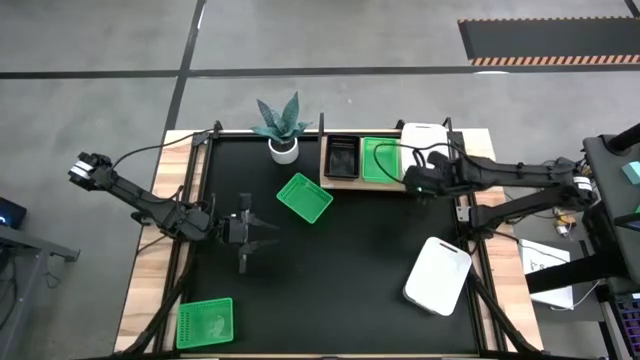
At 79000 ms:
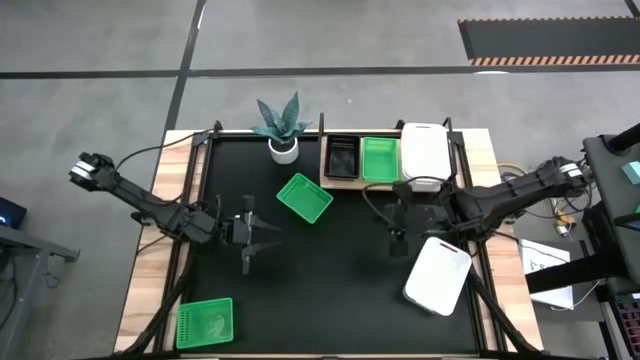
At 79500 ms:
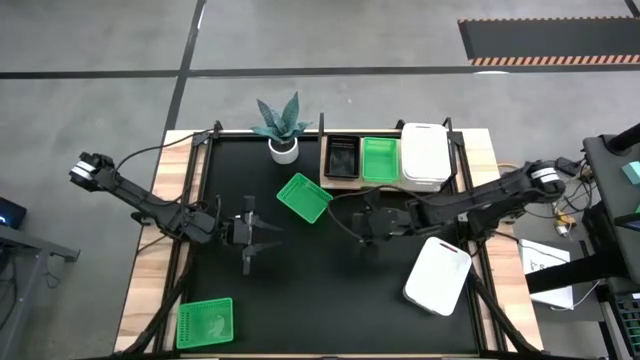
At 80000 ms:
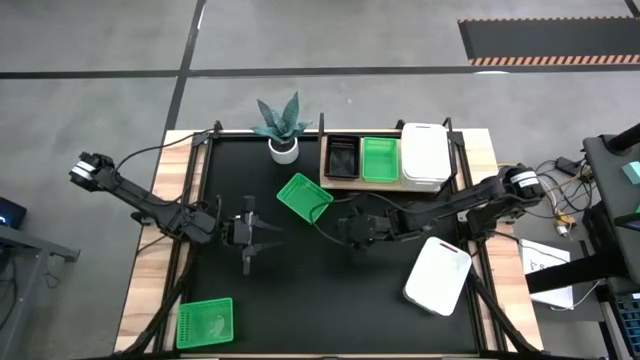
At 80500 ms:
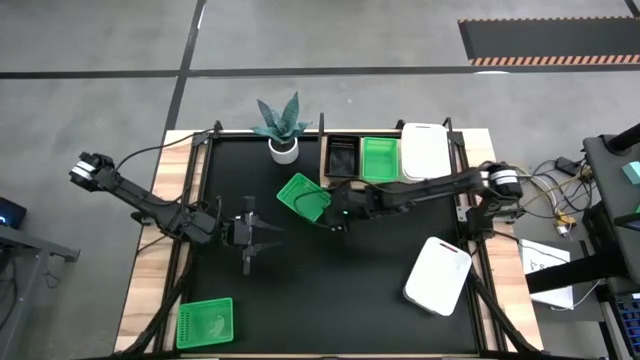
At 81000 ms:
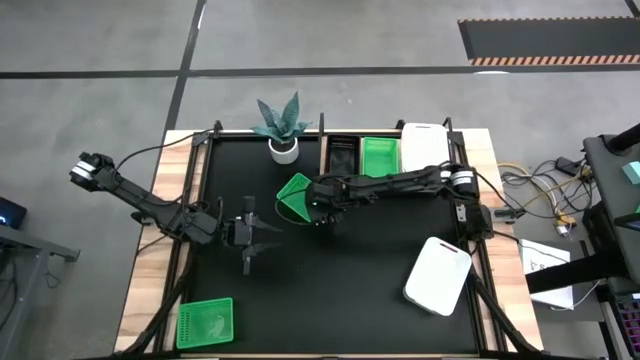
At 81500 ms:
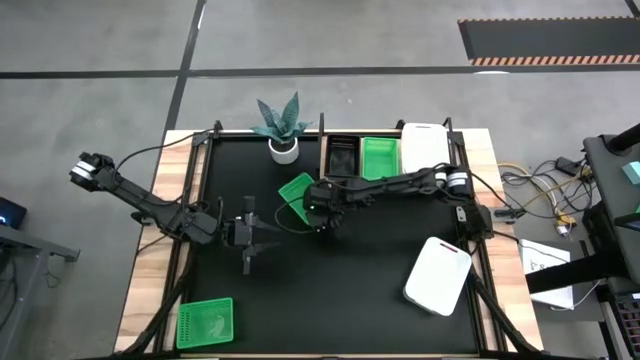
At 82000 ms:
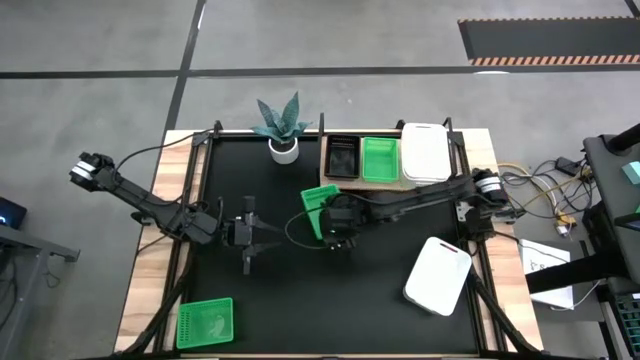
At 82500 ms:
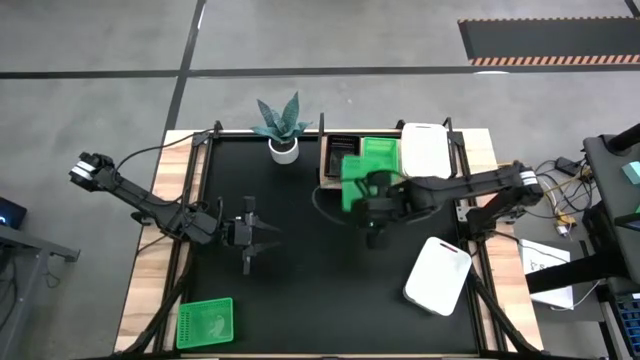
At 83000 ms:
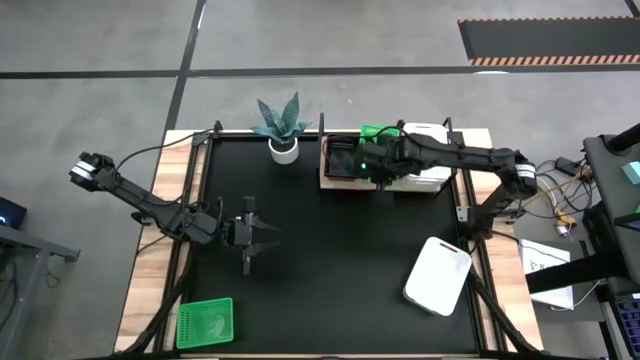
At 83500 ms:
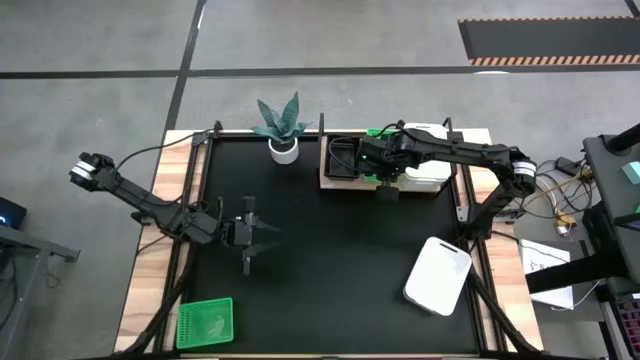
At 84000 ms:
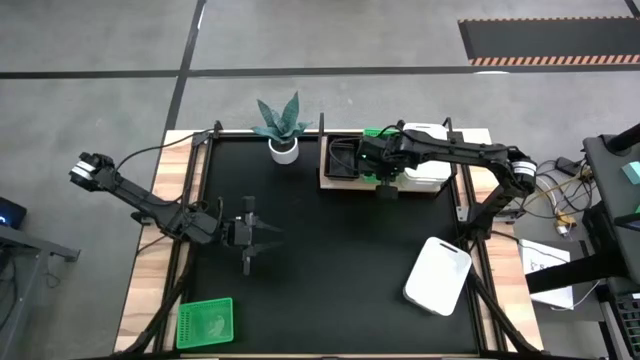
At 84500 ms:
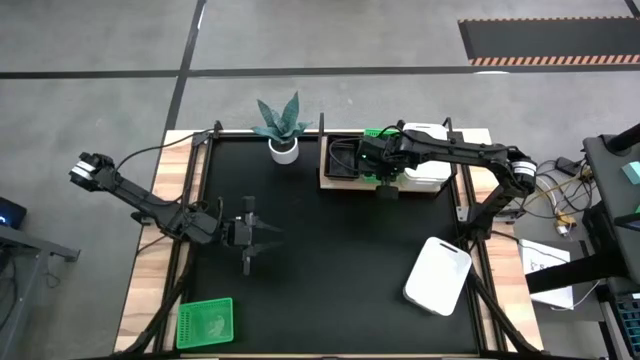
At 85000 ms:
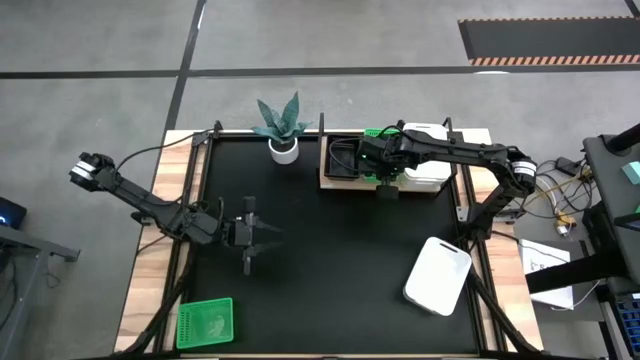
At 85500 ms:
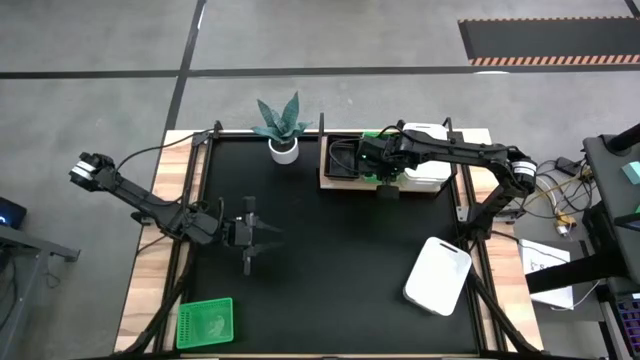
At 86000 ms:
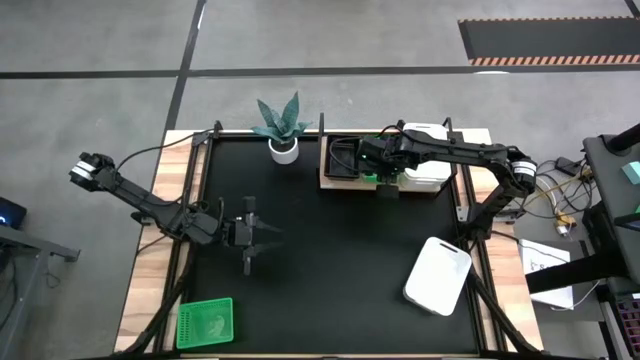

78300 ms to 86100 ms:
Task: Stack baskets on shelf by color
Stack the top green bin on the green bin on the shelf

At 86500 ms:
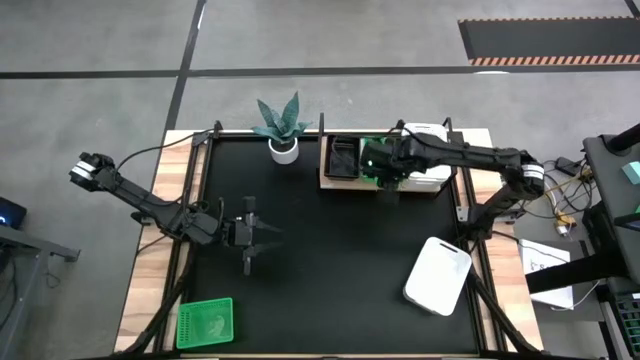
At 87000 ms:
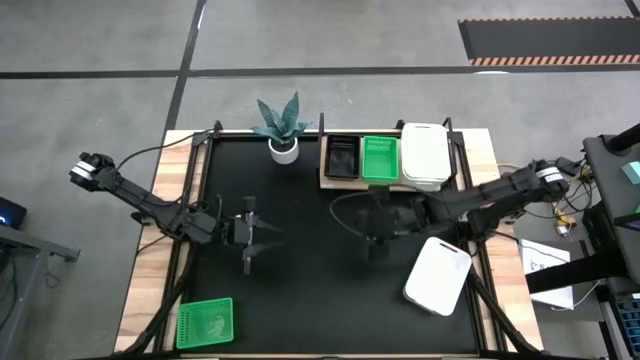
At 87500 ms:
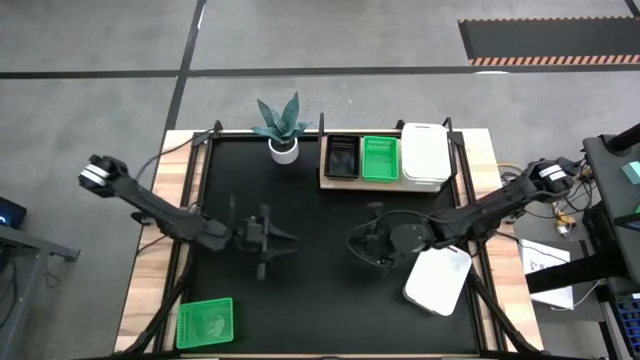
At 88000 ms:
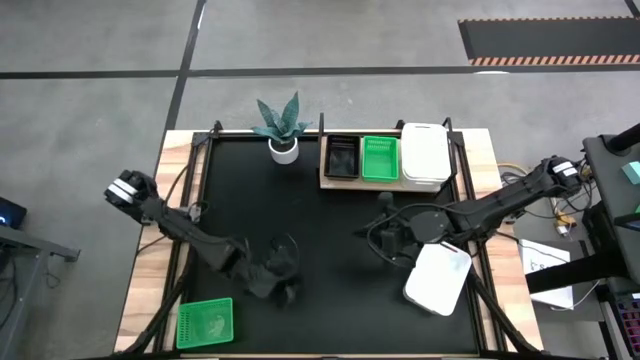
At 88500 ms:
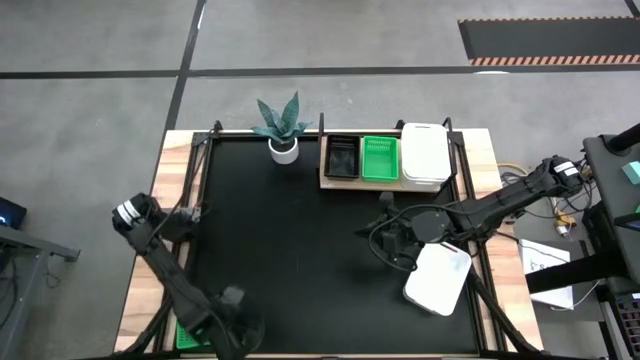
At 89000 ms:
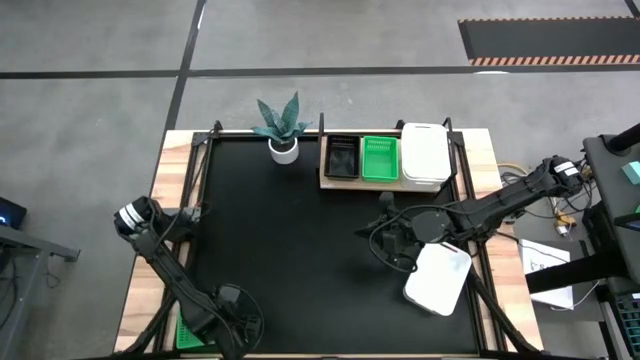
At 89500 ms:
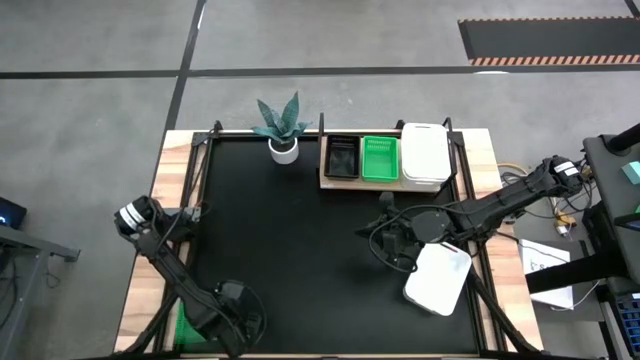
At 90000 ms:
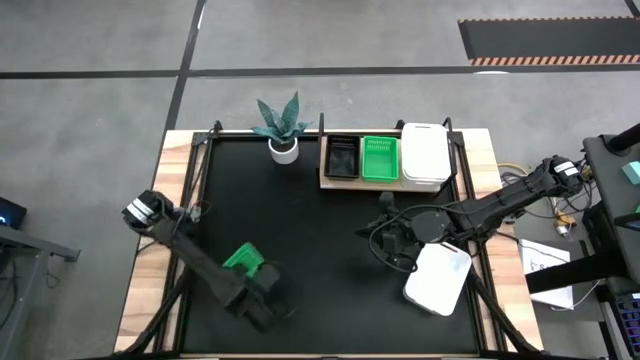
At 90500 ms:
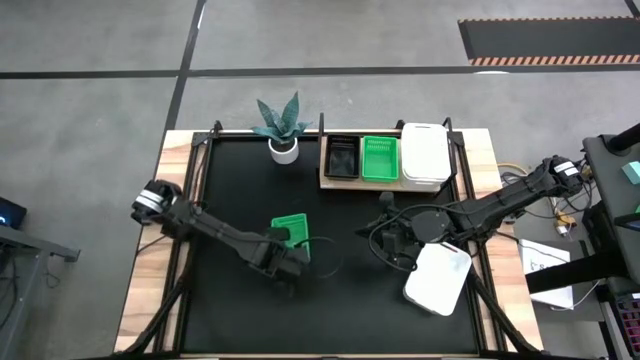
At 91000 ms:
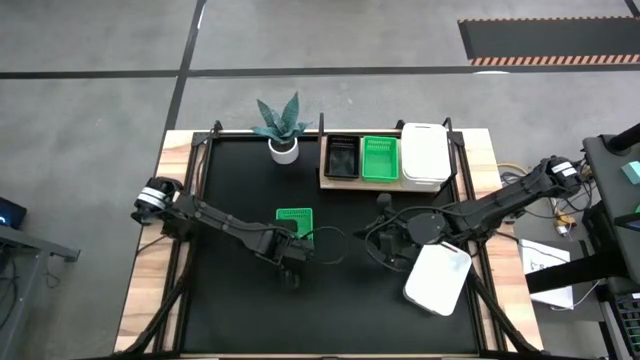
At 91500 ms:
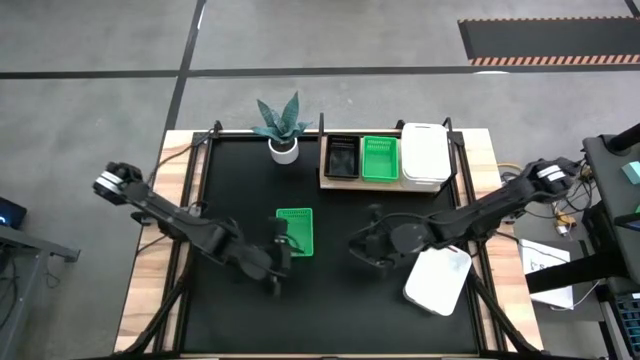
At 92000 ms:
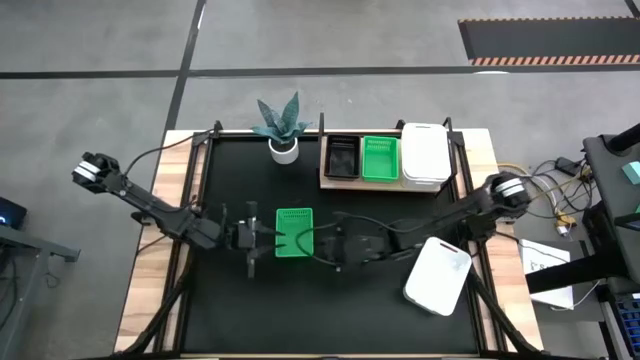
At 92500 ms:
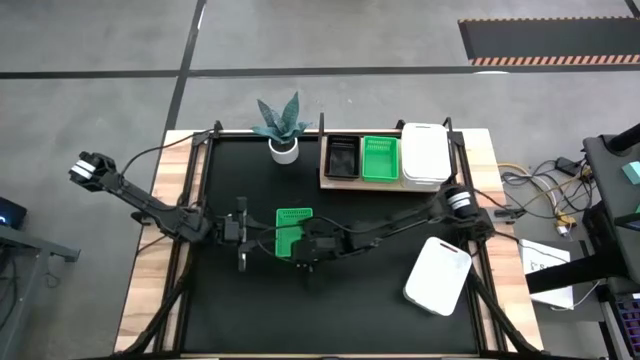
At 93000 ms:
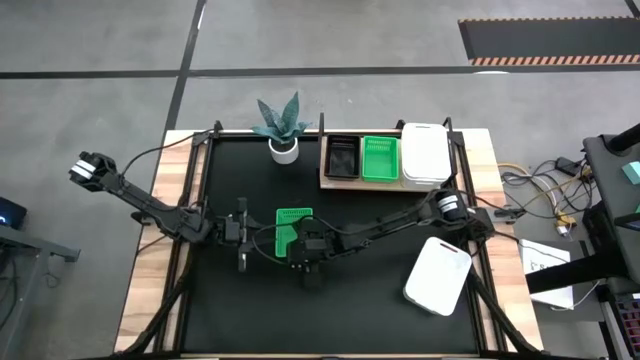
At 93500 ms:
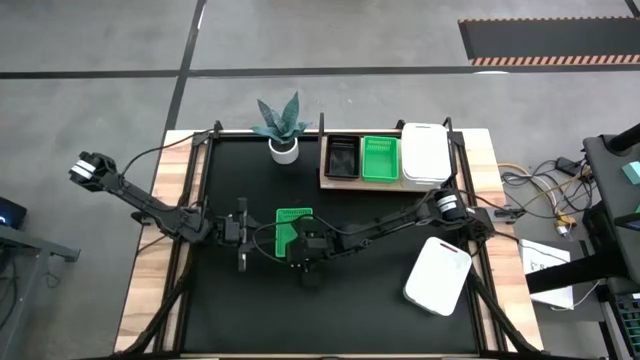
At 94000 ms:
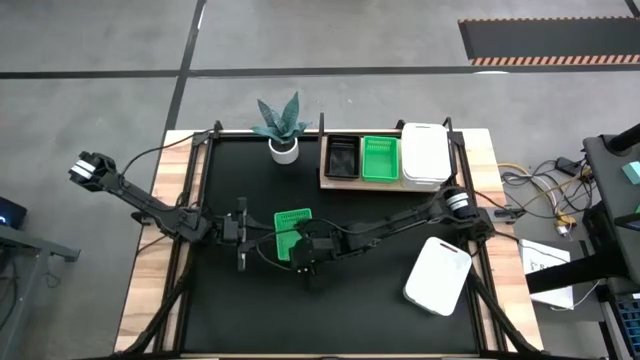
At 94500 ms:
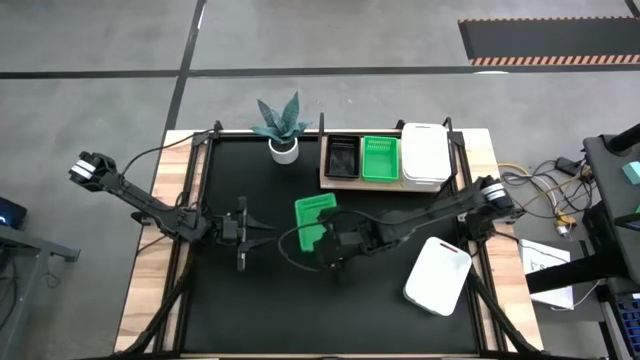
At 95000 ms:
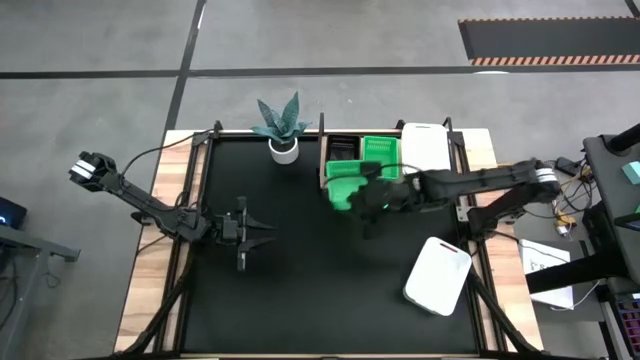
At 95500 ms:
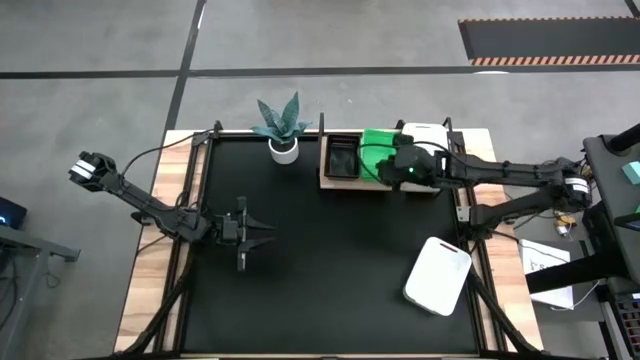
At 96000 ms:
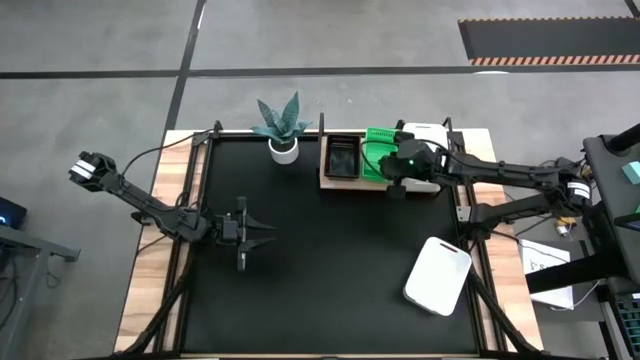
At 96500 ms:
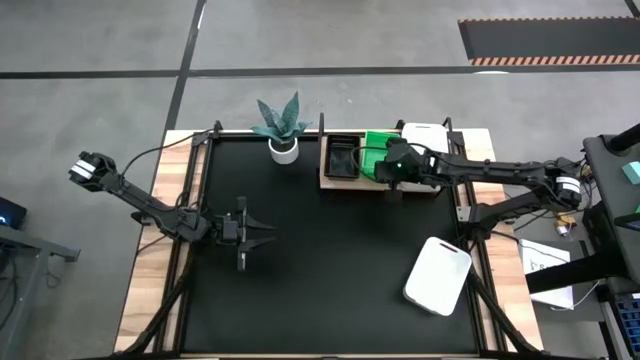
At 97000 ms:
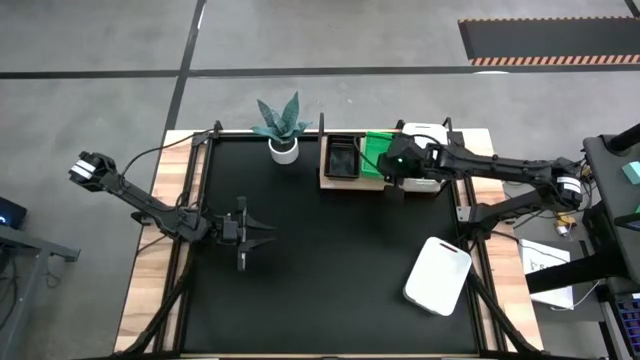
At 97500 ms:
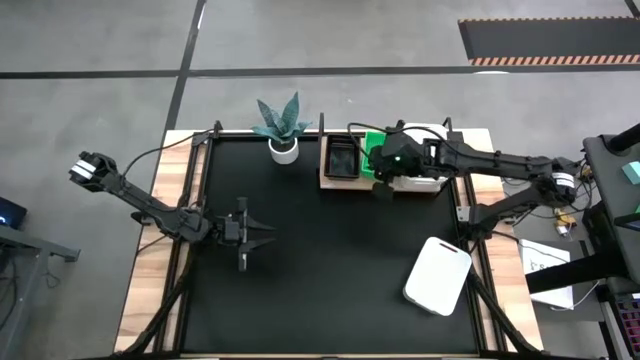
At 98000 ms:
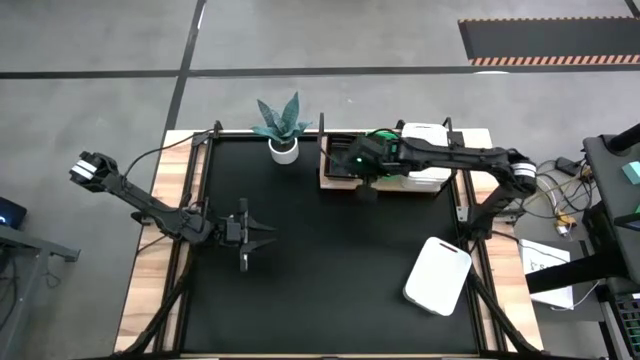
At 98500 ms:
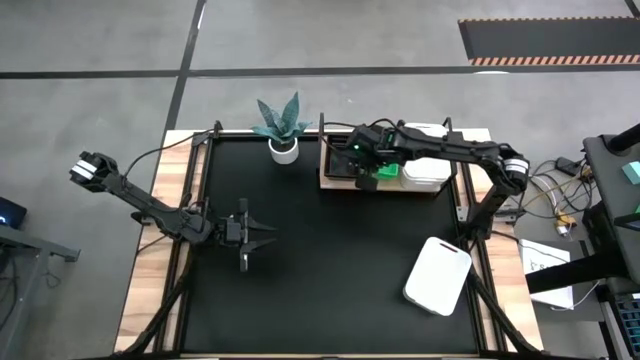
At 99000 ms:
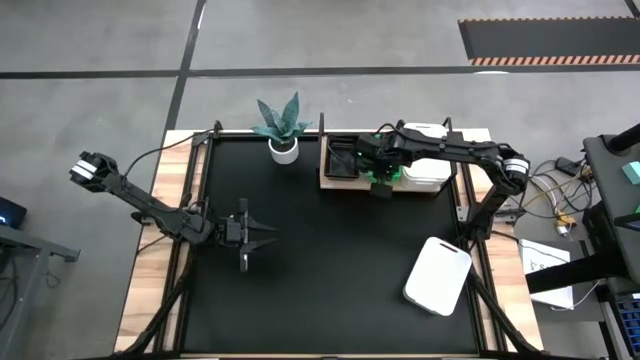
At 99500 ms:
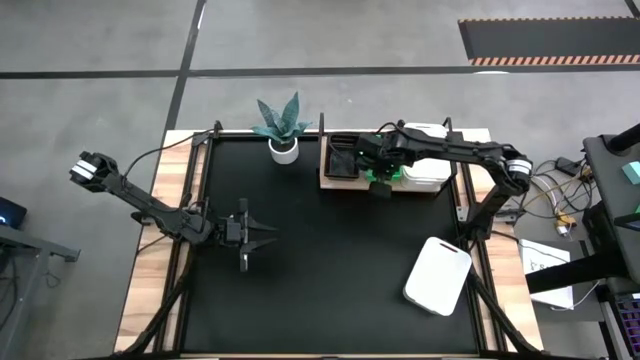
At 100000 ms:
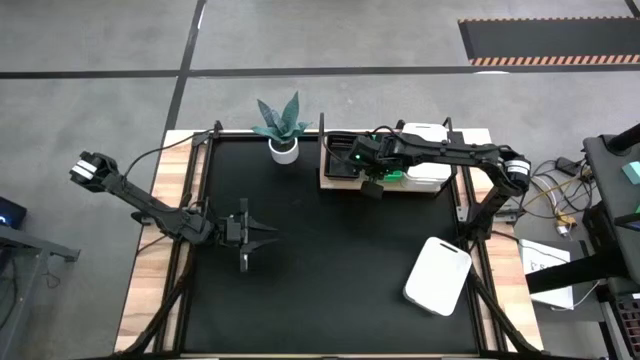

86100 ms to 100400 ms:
Stack the green bin on the green bin on the shelf
